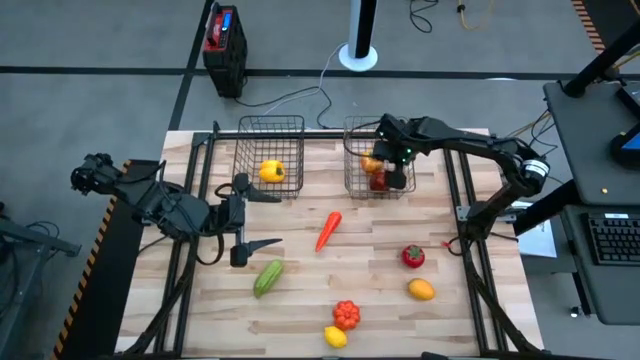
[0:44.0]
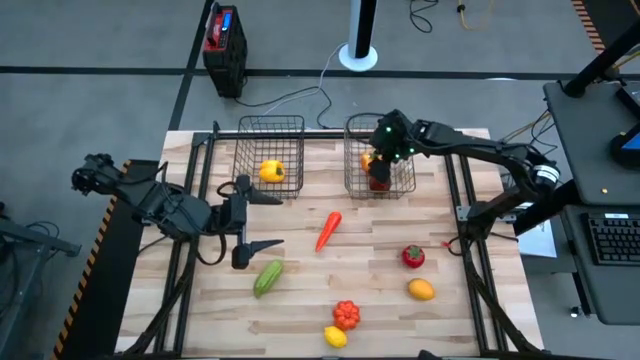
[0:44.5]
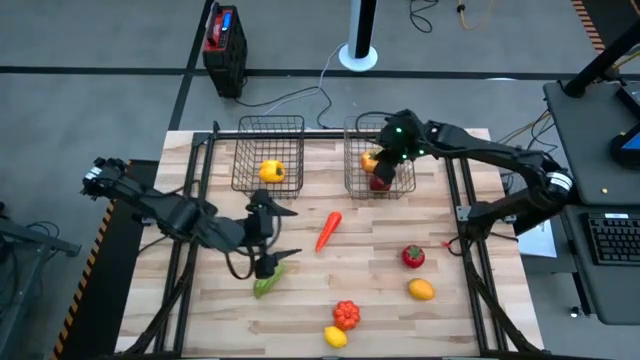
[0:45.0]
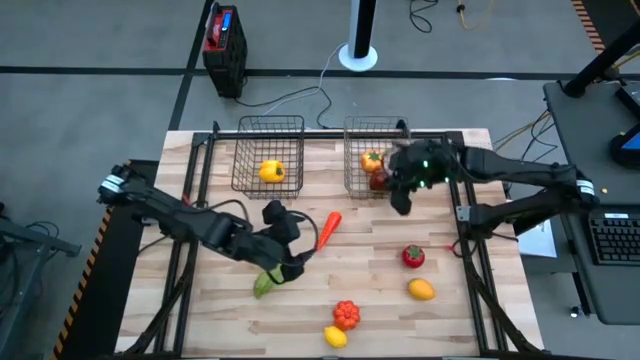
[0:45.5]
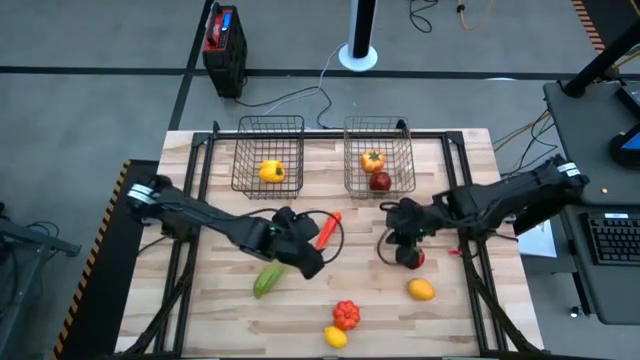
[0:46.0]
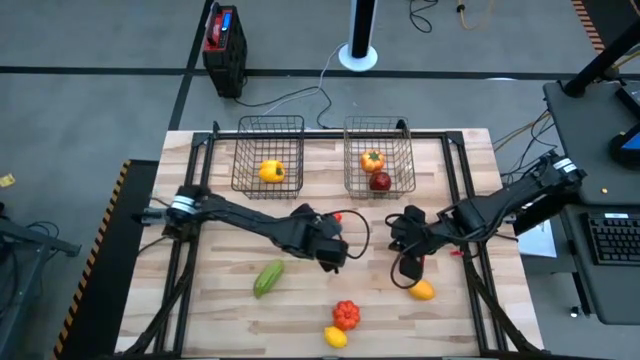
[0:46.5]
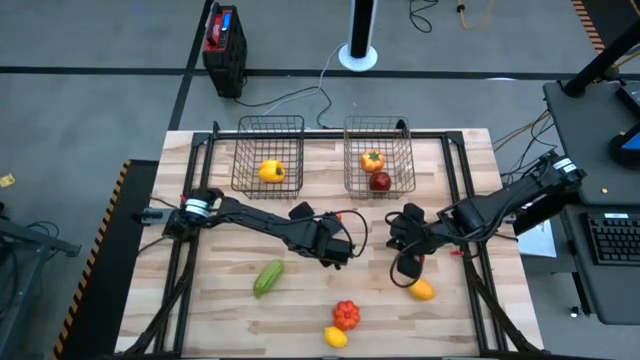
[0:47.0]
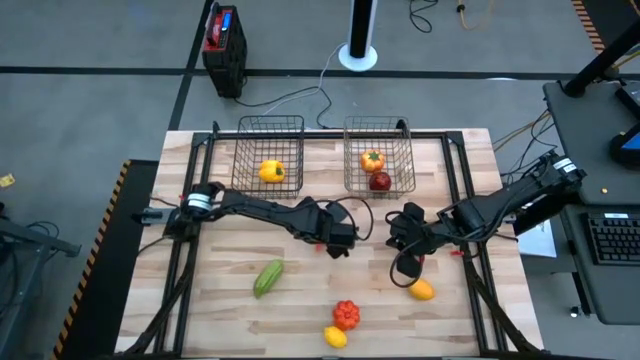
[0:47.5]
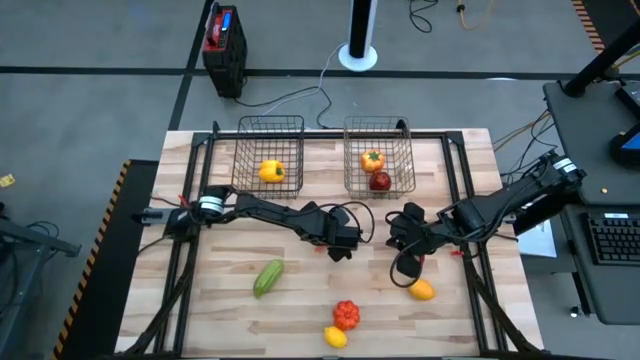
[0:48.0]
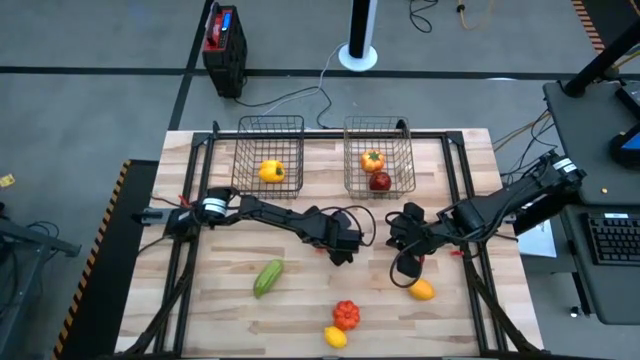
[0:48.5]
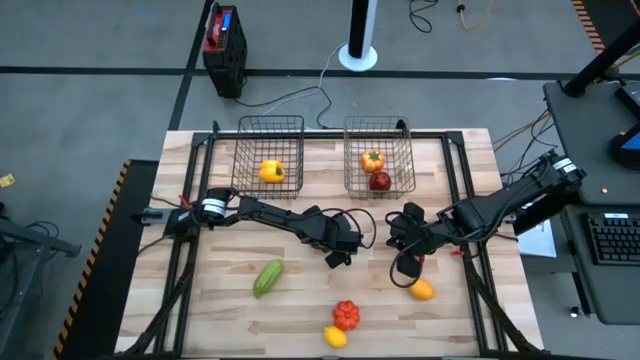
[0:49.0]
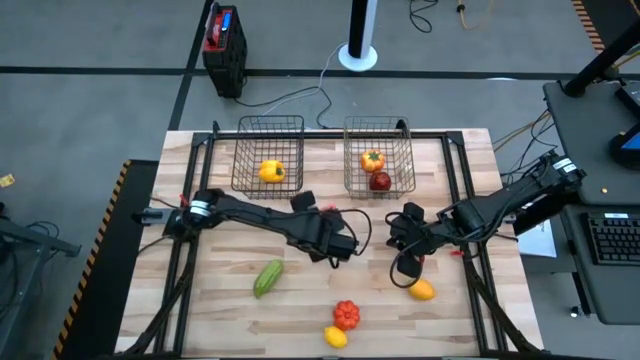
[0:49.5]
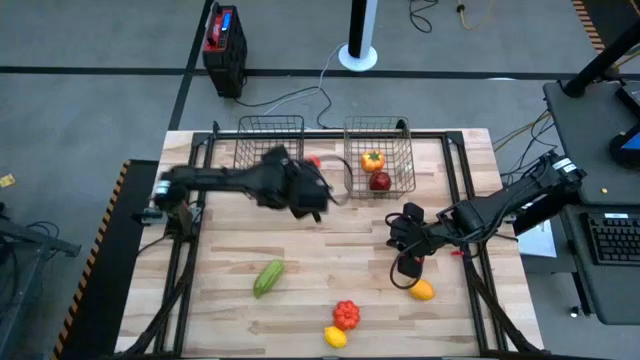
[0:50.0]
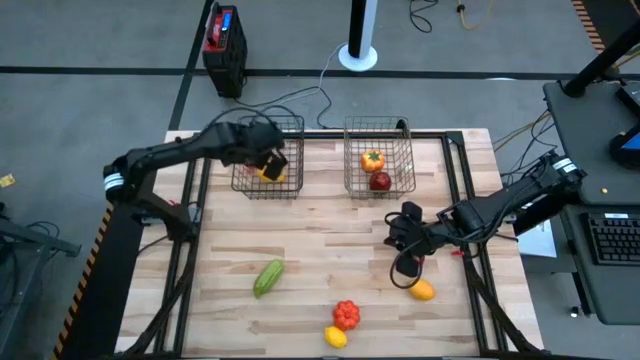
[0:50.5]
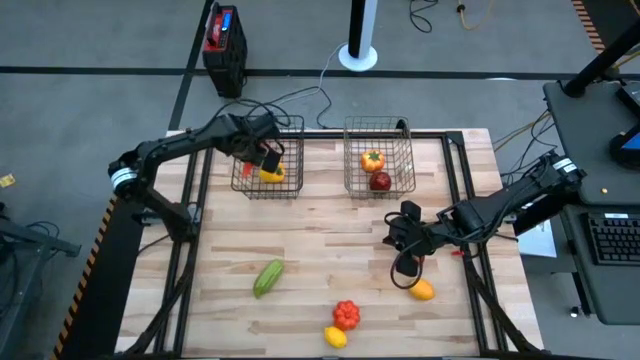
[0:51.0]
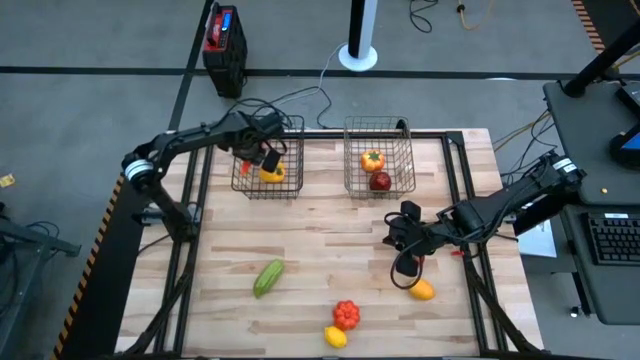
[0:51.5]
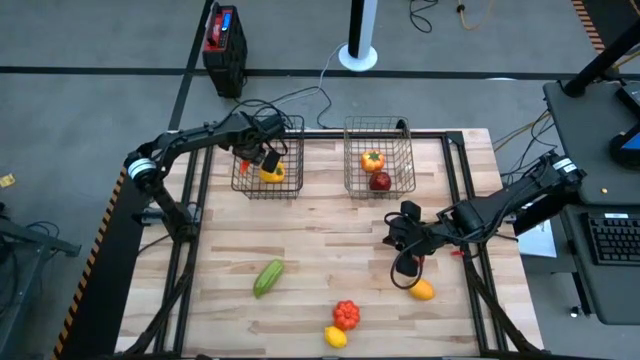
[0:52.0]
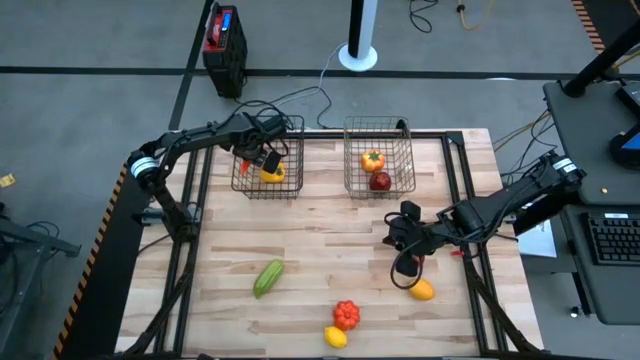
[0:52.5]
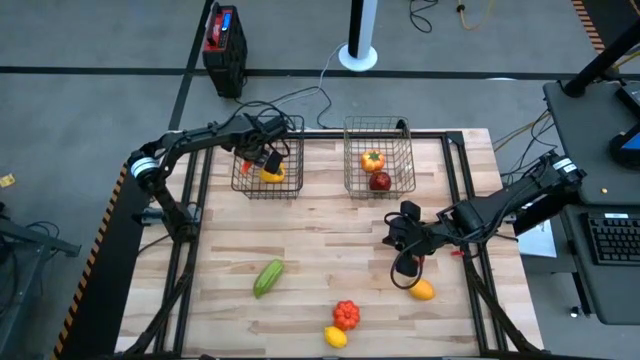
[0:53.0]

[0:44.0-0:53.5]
Task: Sort produce into baskets
Put the orange carrot into the black wire basket

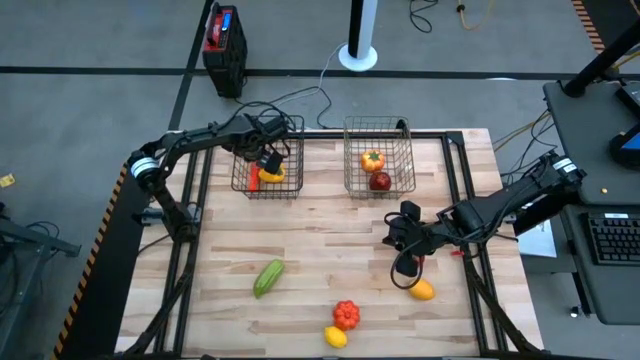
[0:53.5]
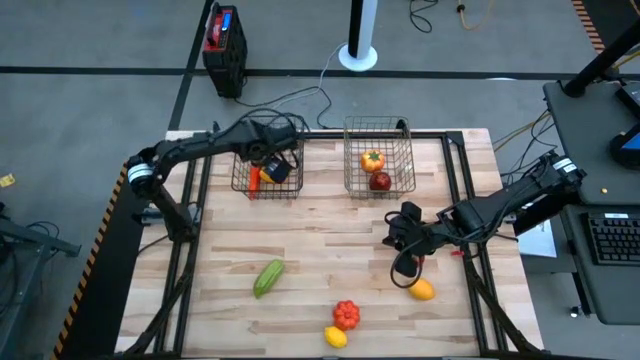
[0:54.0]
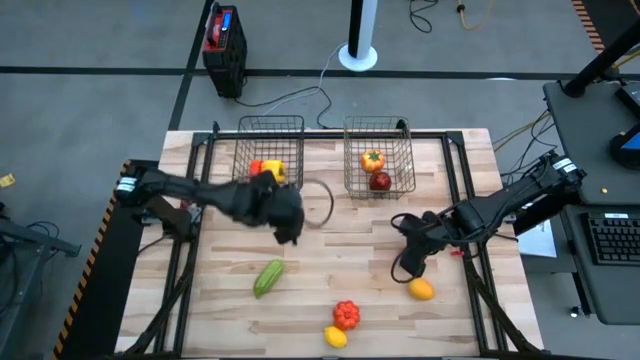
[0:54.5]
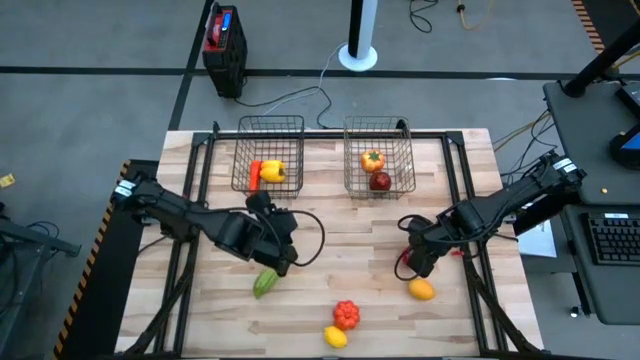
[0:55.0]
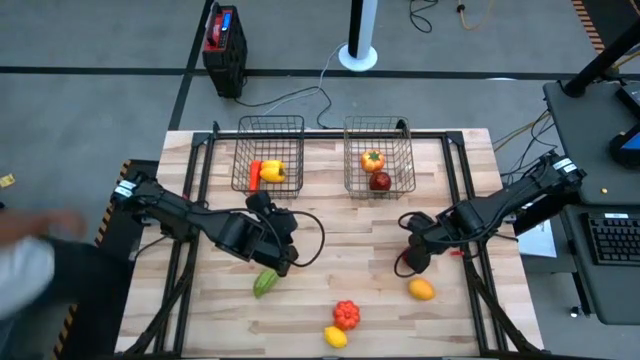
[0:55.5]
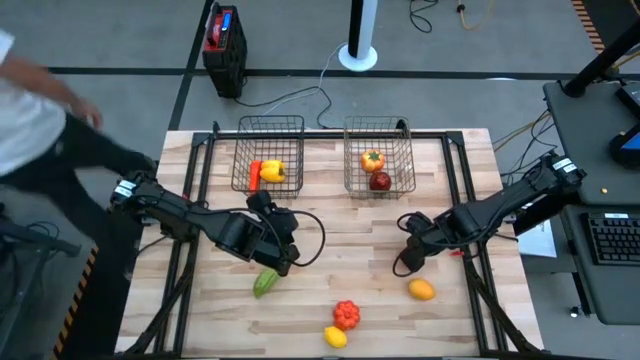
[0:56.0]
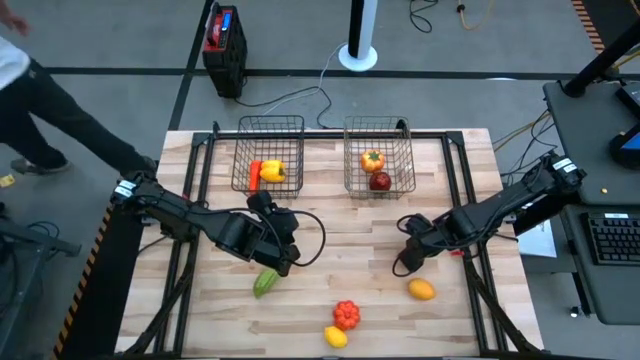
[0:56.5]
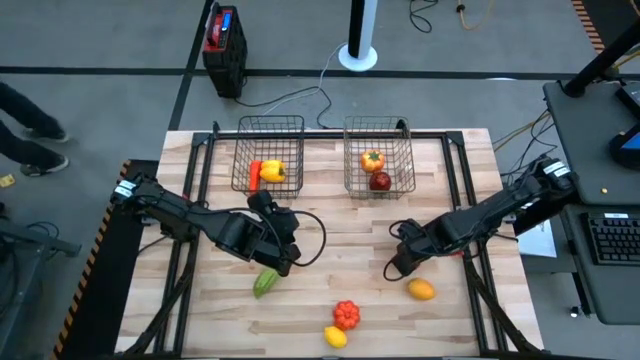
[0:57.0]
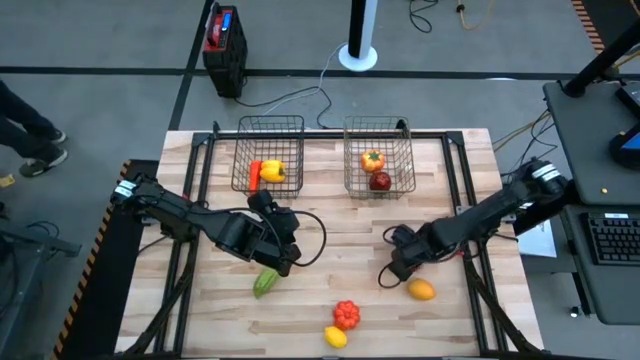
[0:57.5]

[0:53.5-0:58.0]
Put the red tomato into the gold wire basket

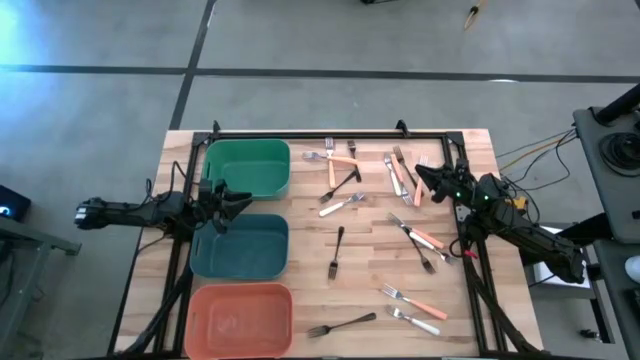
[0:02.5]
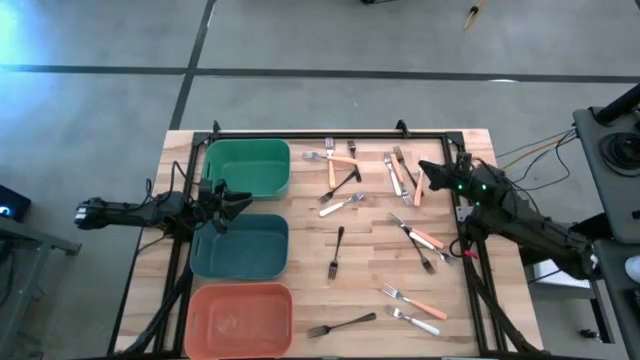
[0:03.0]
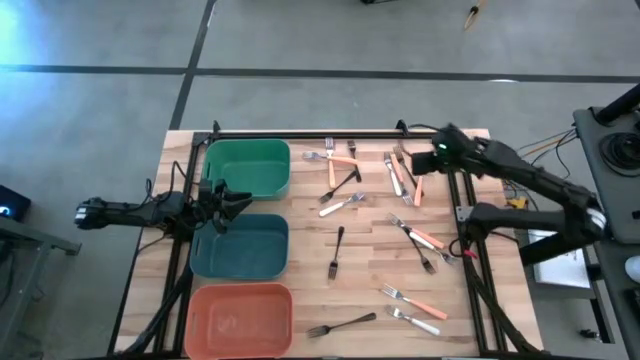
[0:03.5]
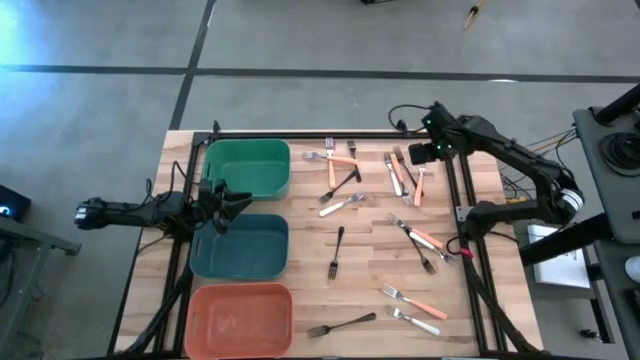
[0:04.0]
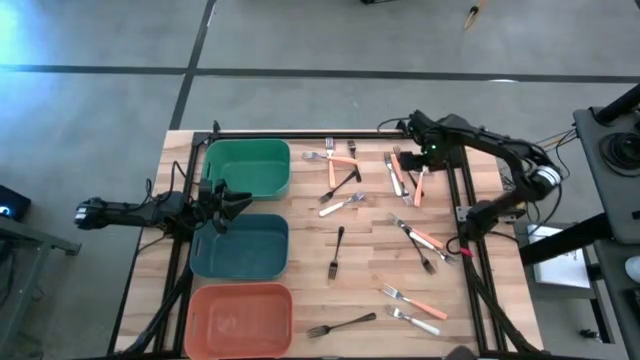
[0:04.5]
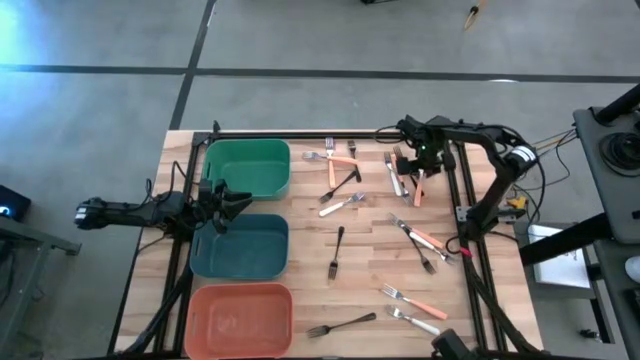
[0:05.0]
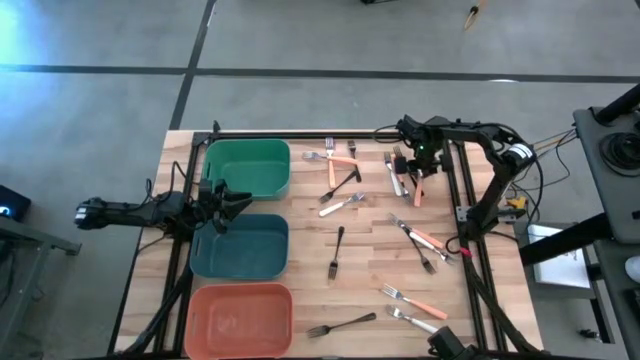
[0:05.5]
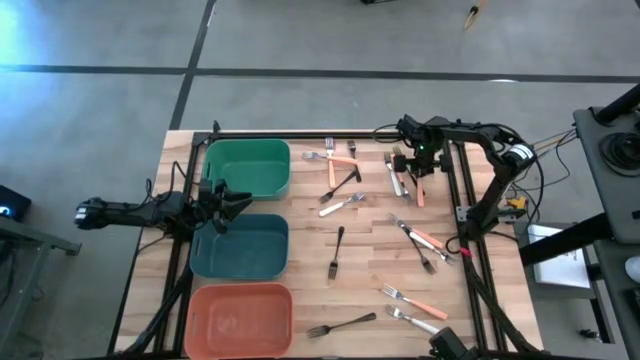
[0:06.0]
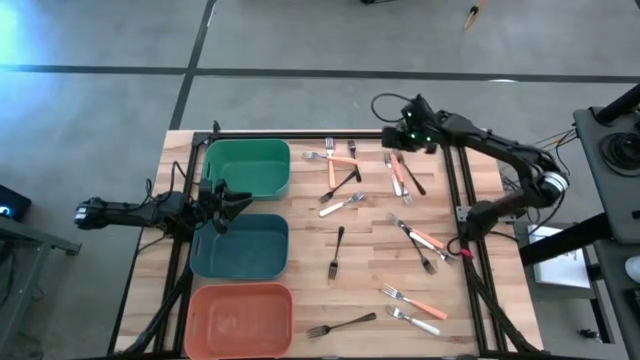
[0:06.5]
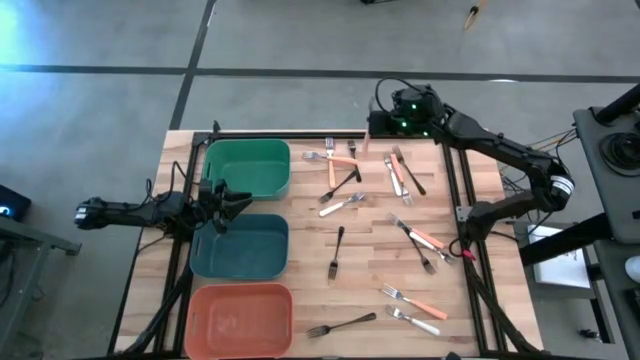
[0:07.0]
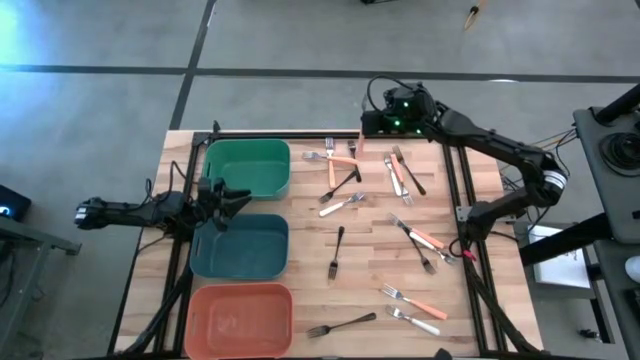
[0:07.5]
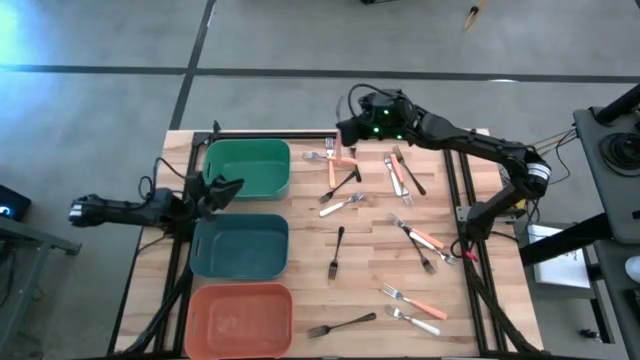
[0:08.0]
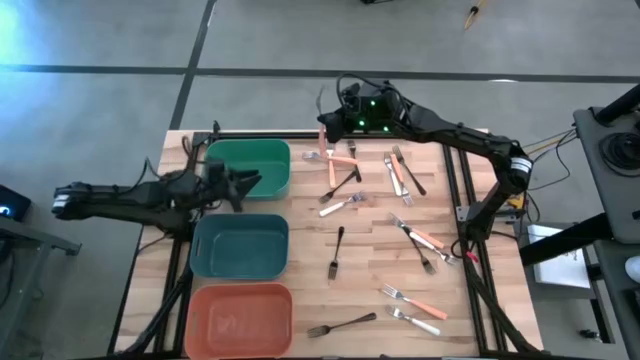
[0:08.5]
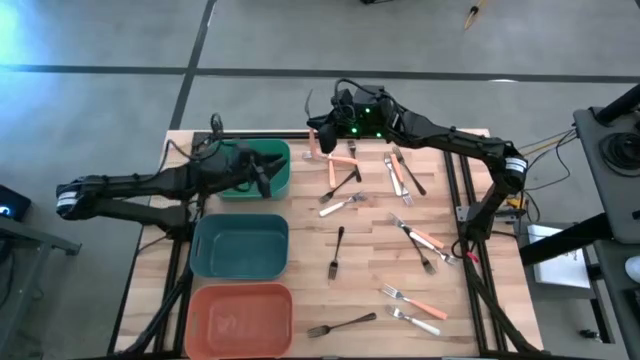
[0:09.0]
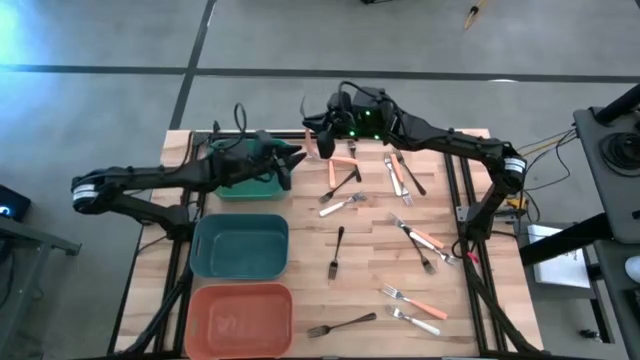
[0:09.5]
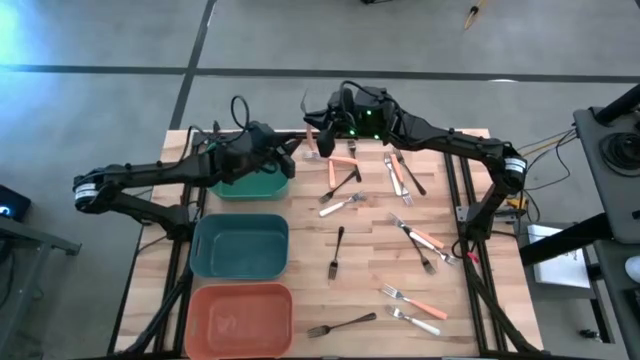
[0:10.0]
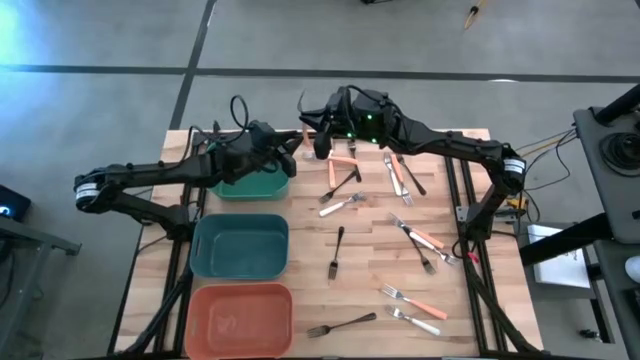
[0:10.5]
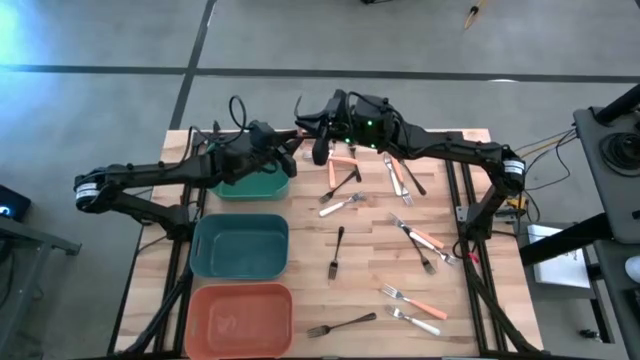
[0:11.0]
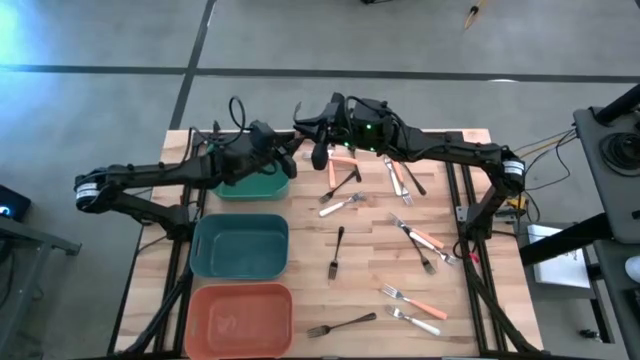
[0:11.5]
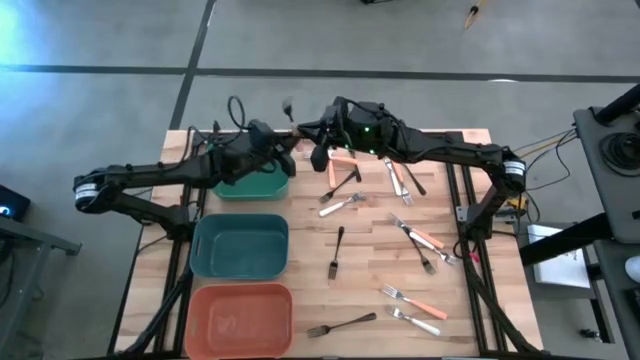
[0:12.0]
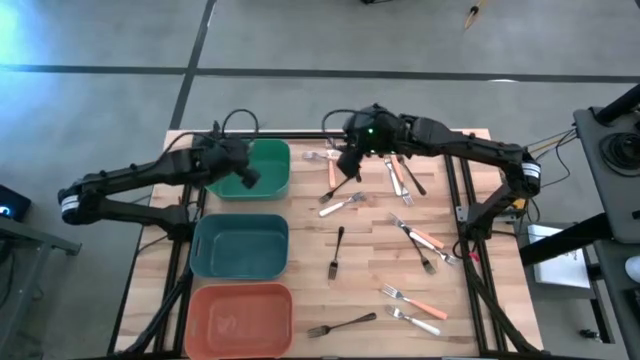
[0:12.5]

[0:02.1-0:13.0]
Task: Sort silverware by color (type)
Put the orange fork into the green bin
